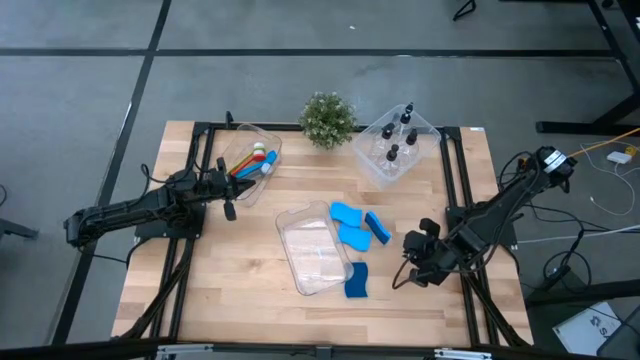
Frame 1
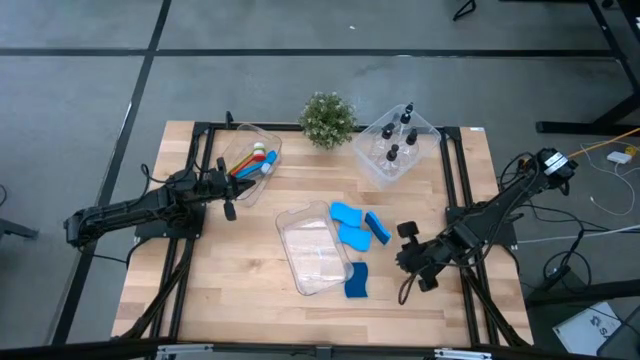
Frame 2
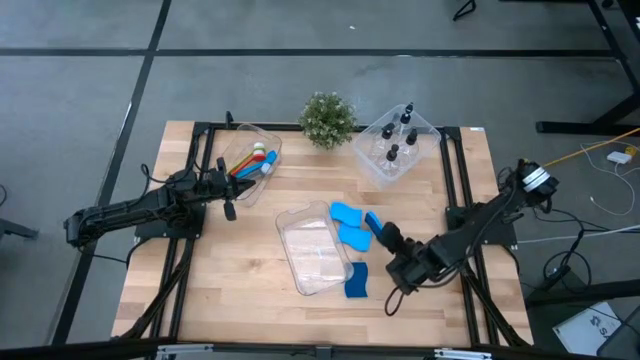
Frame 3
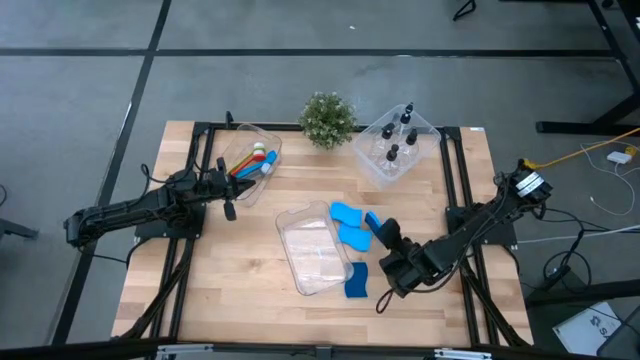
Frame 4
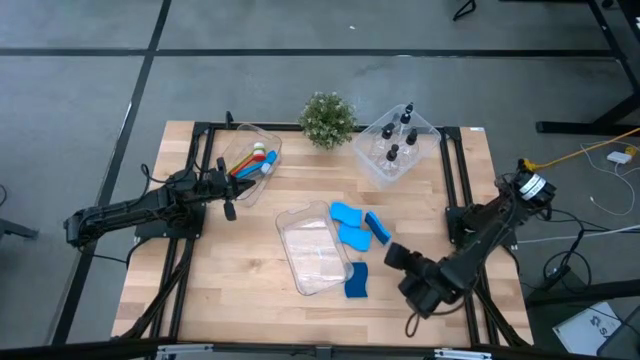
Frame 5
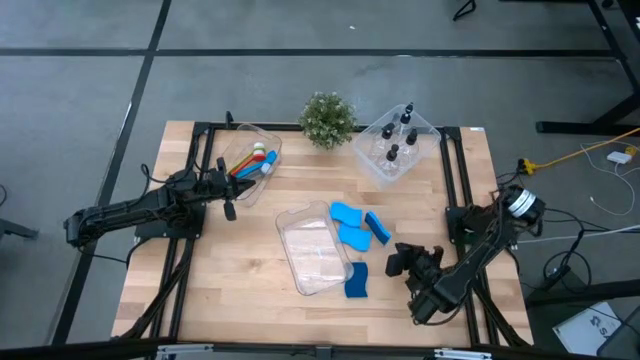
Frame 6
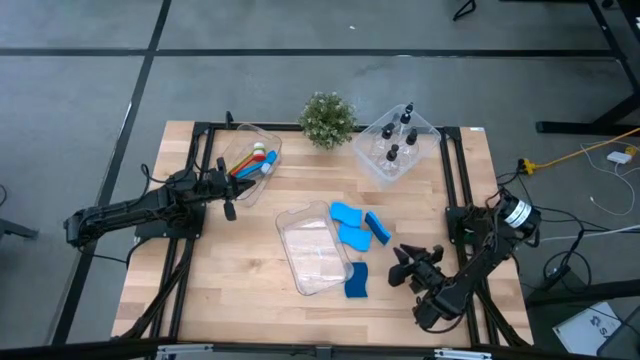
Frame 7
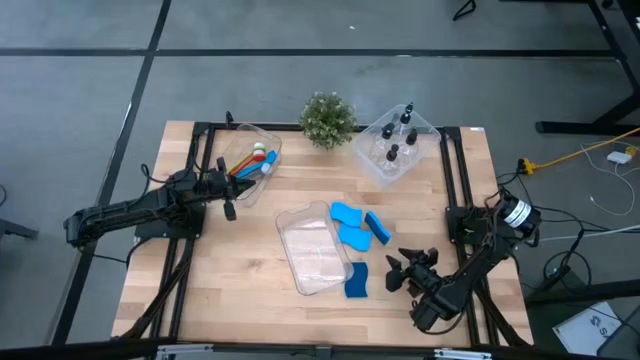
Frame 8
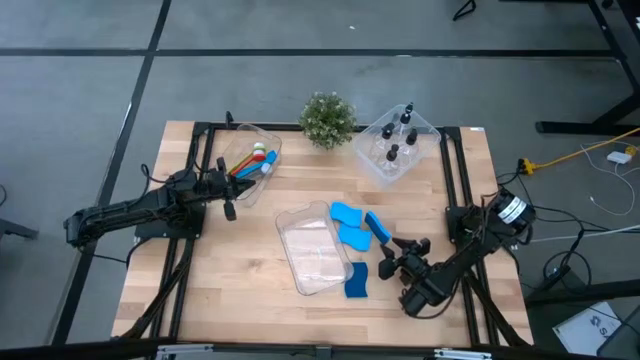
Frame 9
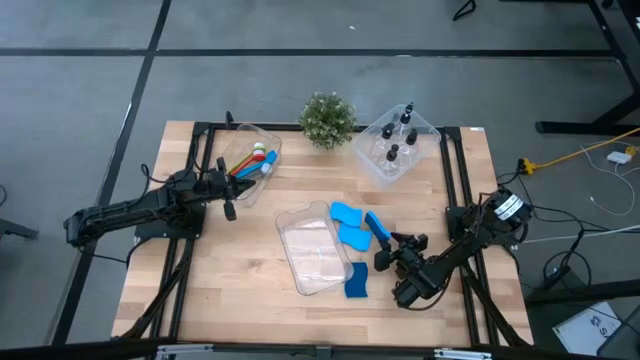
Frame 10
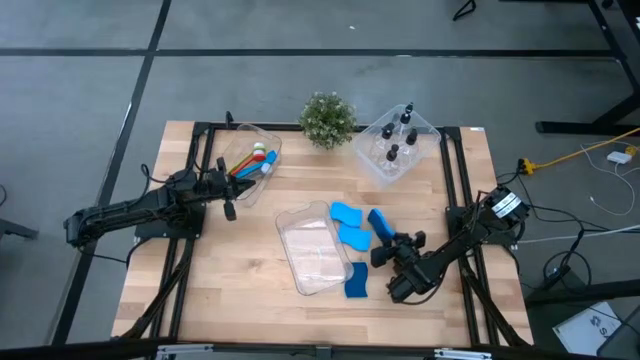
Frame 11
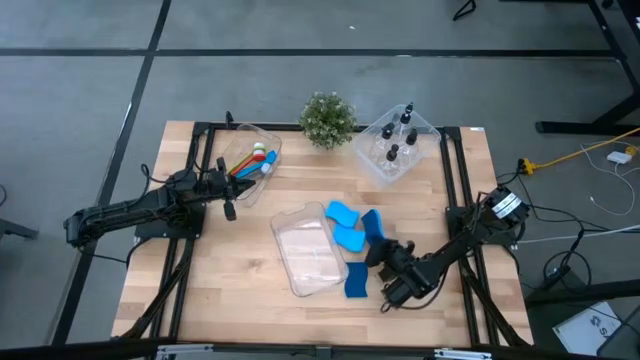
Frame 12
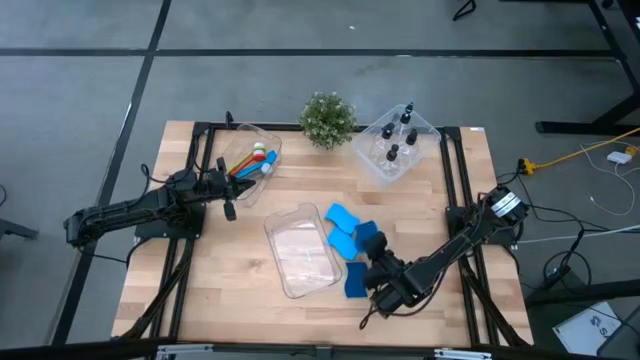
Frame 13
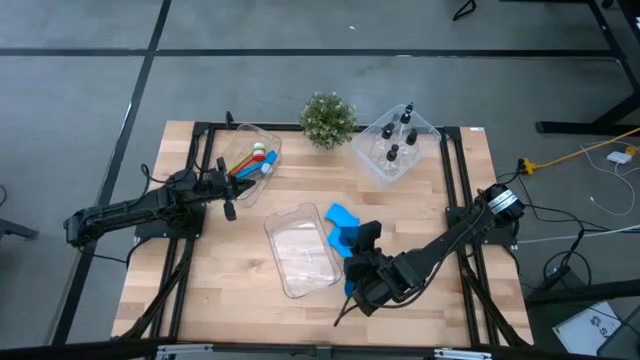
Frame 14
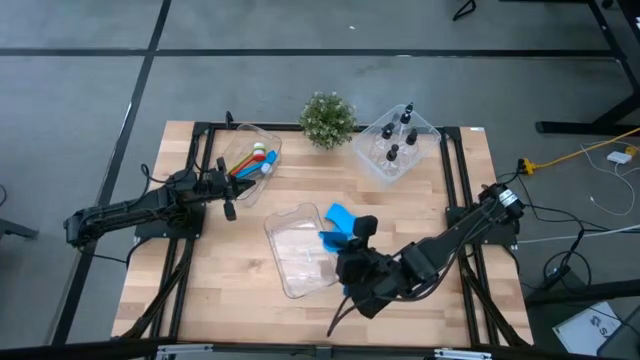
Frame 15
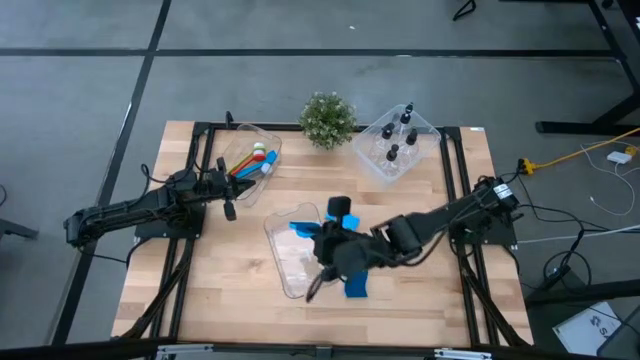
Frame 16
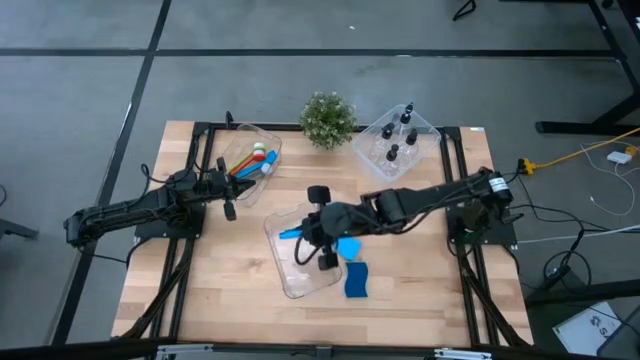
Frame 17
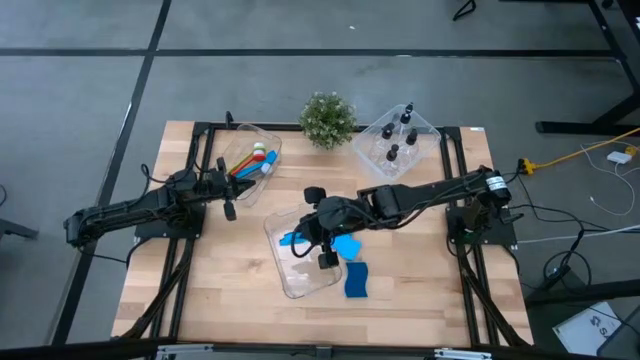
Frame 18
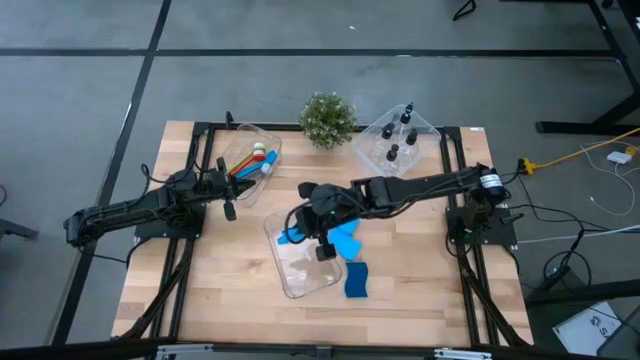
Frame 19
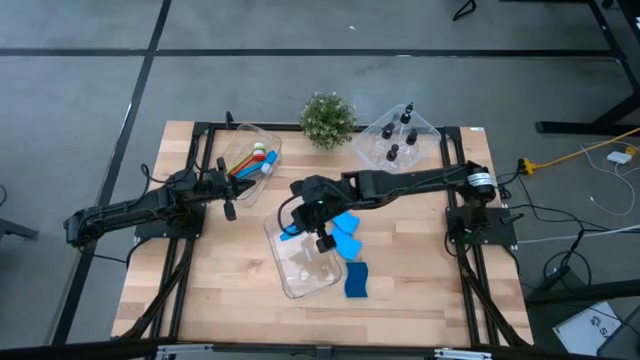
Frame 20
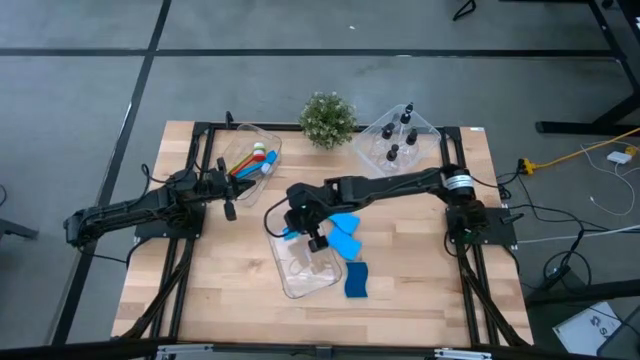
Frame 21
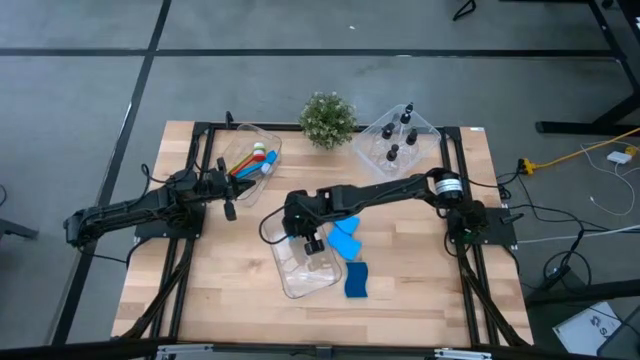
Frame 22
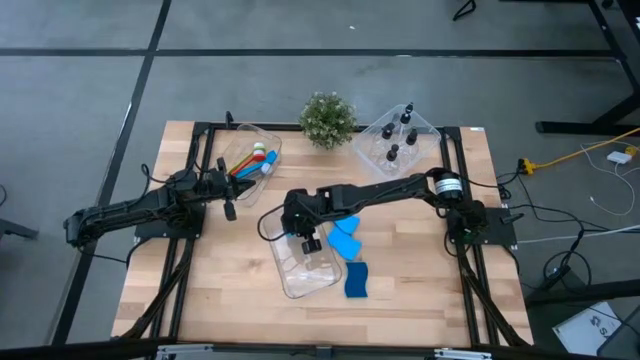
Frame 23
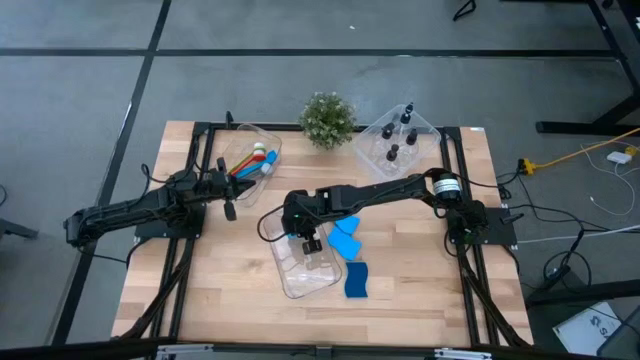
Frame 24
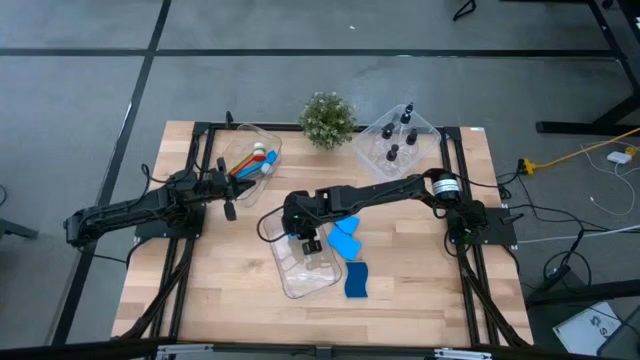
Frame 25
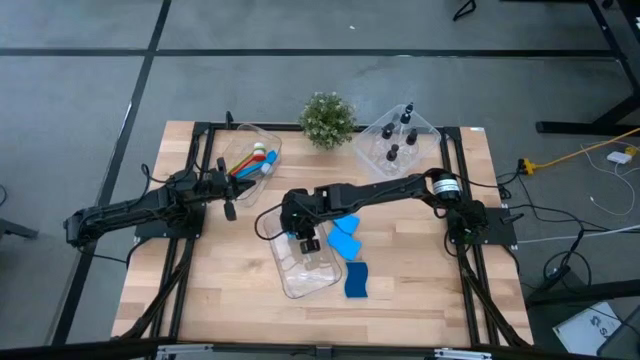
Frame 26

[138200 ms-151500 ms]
Task: Pick & Place Kitchen Sink Supplies
Put the sponge into the bottom transparent bin

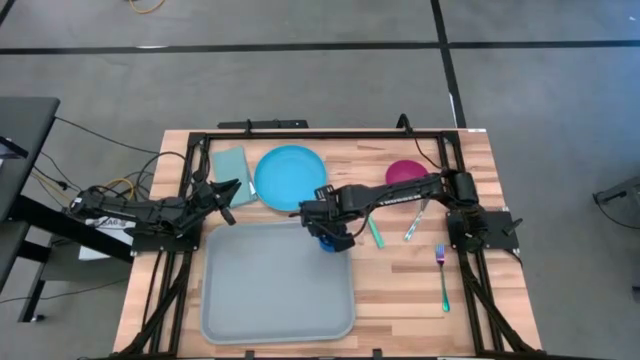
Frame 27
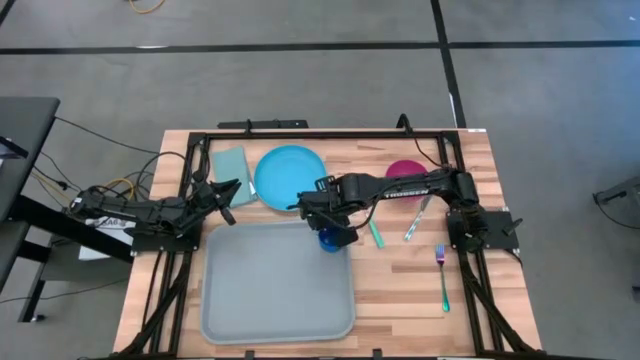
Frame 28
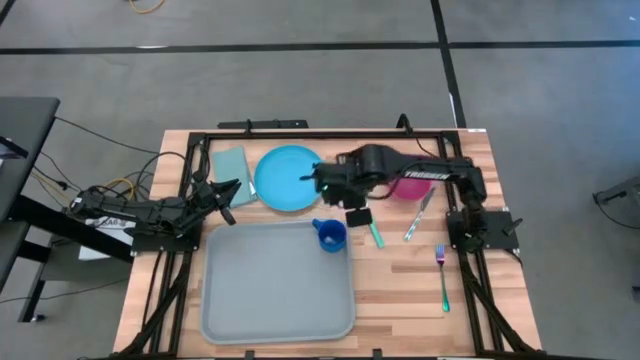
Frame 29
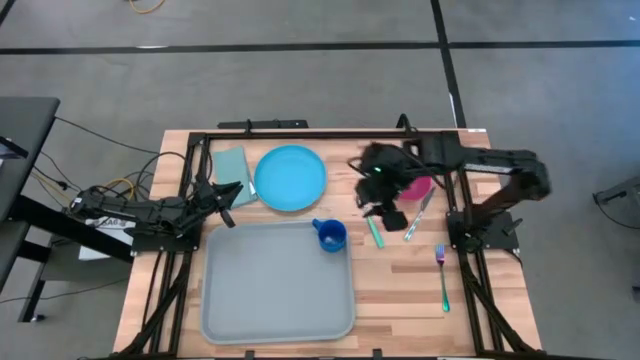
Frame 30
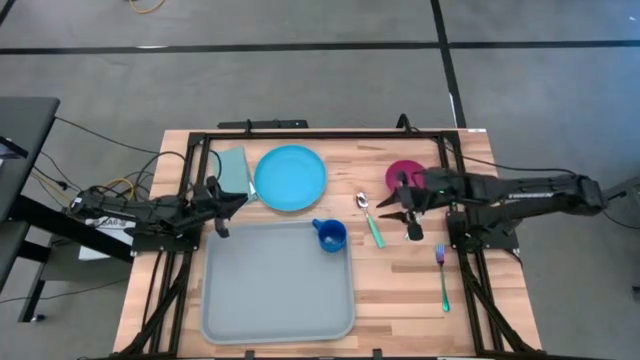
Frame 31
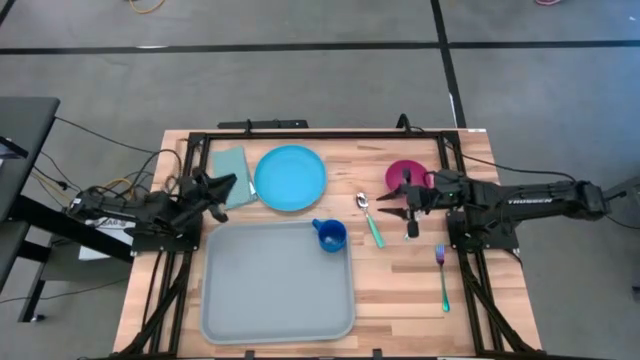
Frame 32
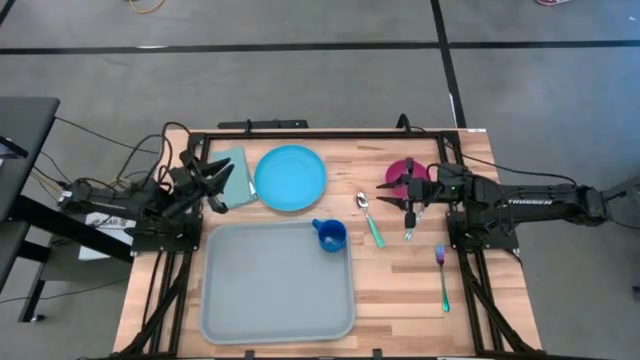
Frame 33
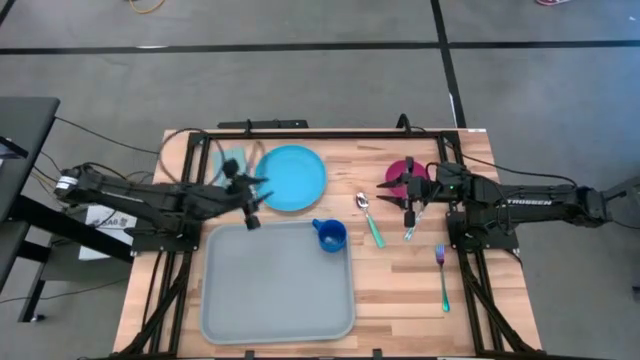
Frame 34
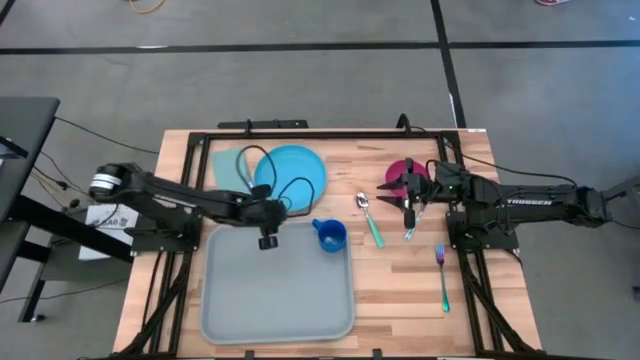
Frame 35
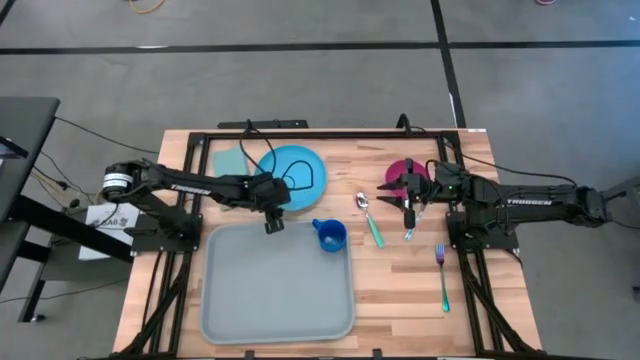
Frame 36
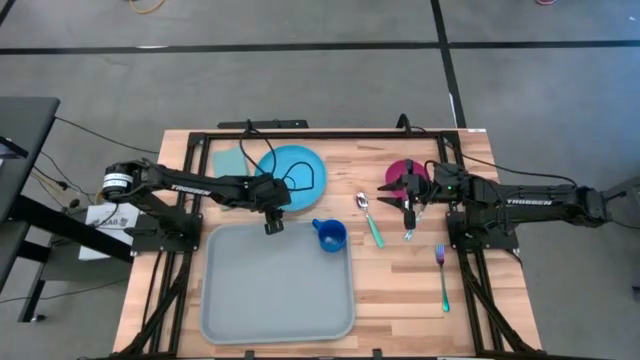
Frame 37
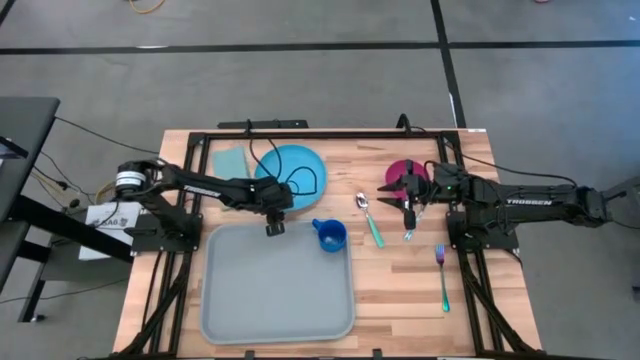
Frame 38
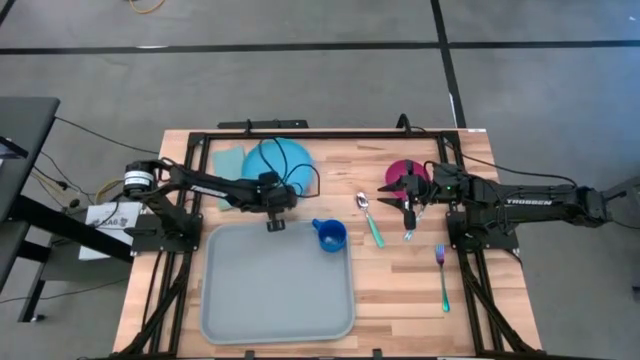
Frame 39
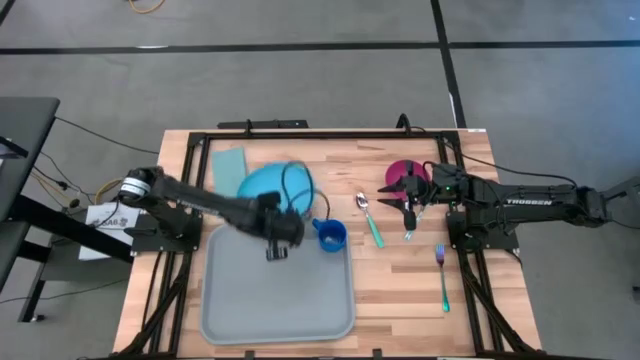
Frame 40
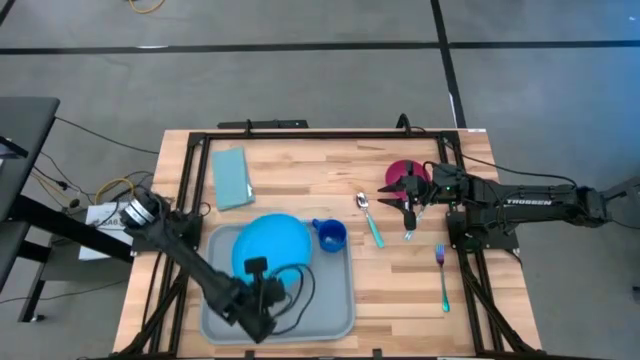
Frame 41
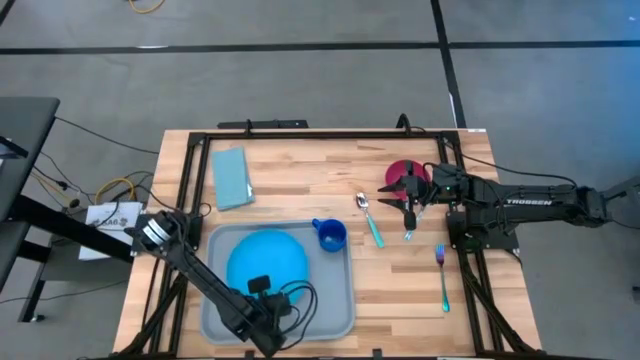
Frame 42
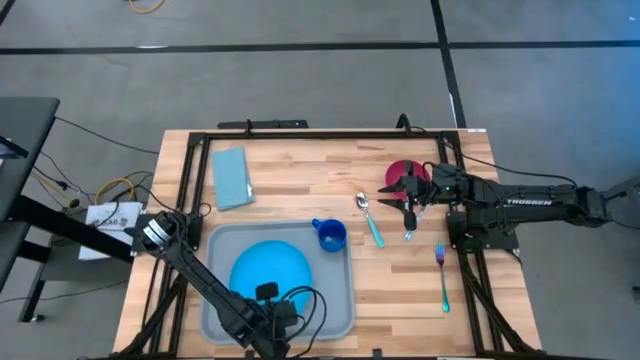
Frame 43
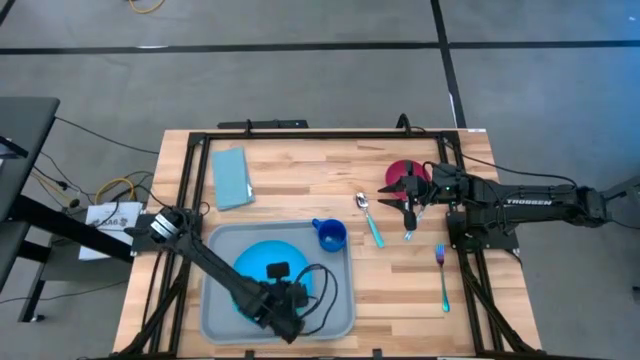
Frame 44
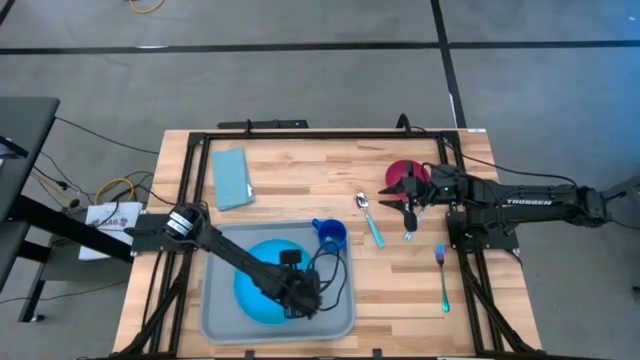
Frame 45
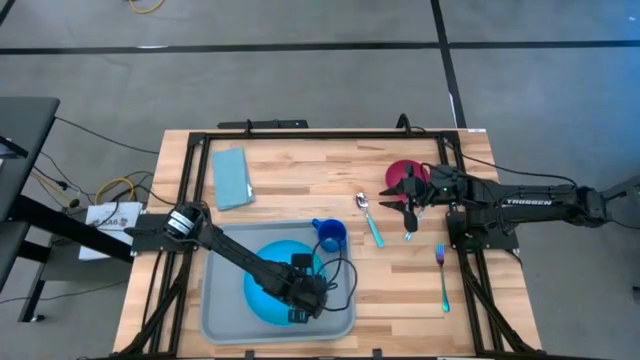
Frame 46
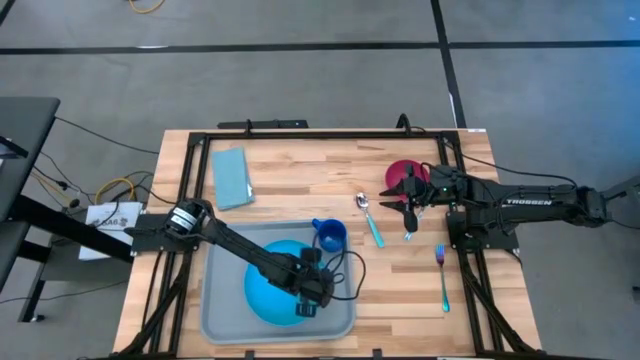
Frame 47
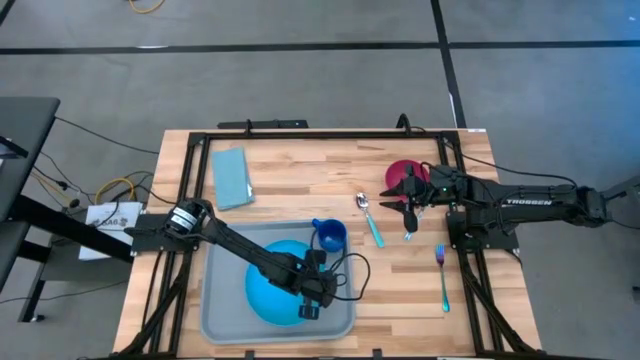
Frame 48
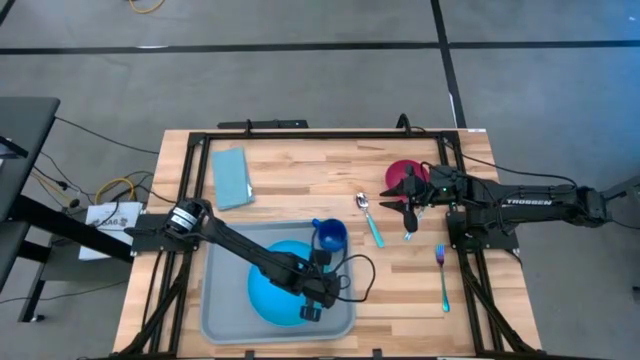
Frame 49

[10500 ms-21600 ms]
Task: Set up tray
Put the blue plate on the bottom left of the blue mug on the gray serving tray
